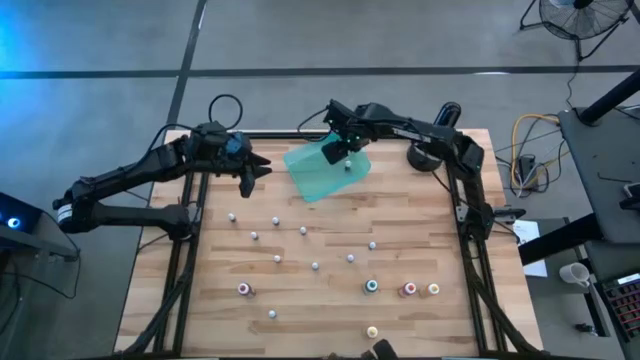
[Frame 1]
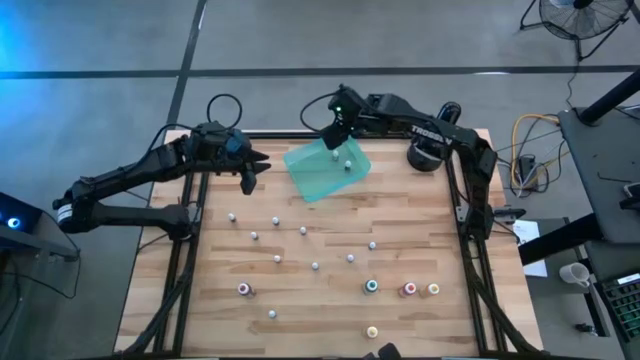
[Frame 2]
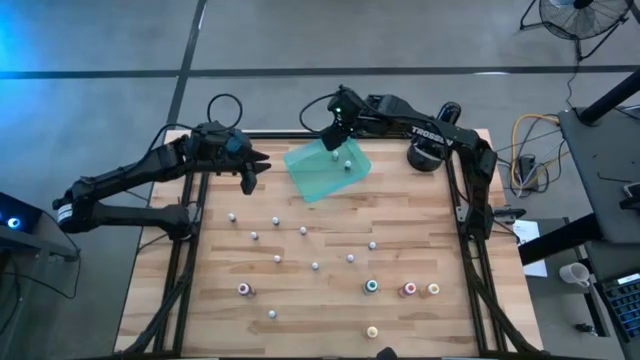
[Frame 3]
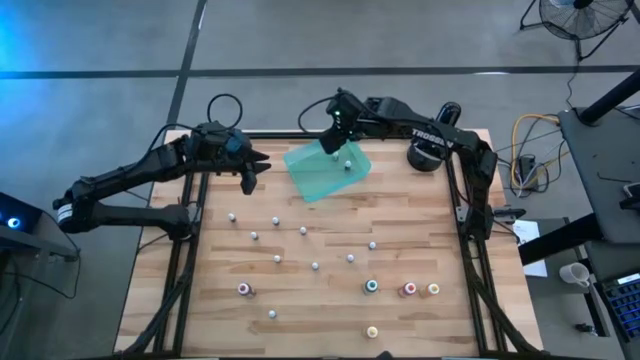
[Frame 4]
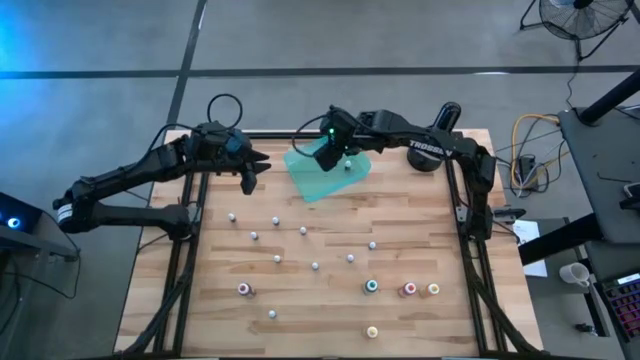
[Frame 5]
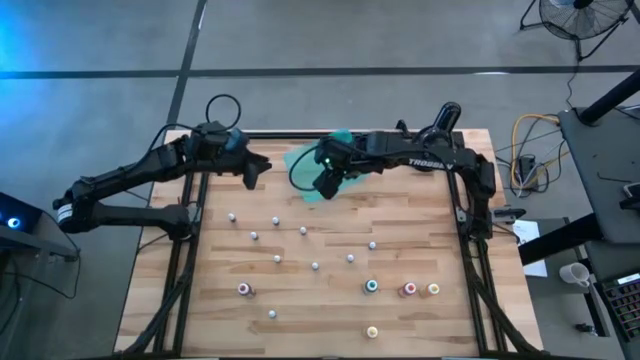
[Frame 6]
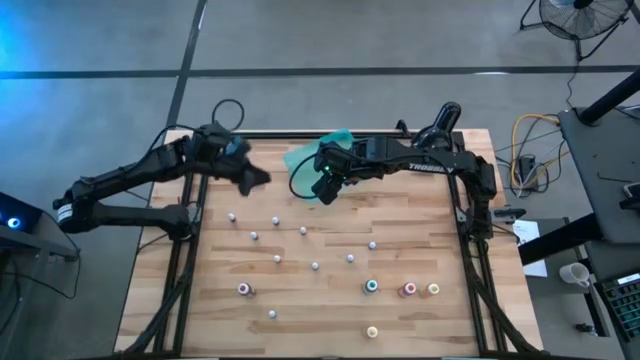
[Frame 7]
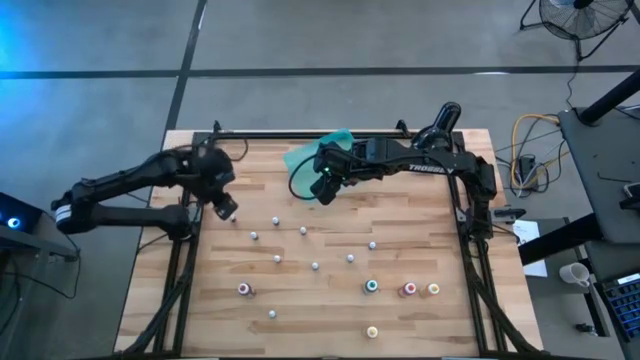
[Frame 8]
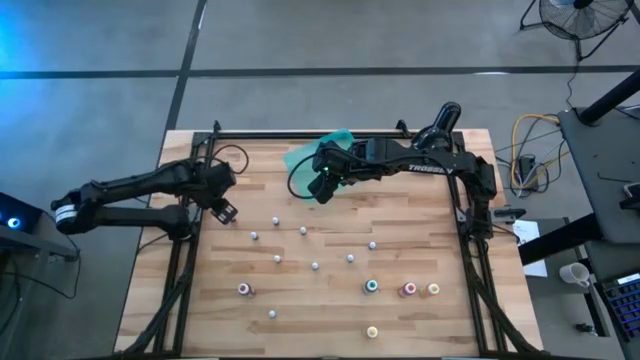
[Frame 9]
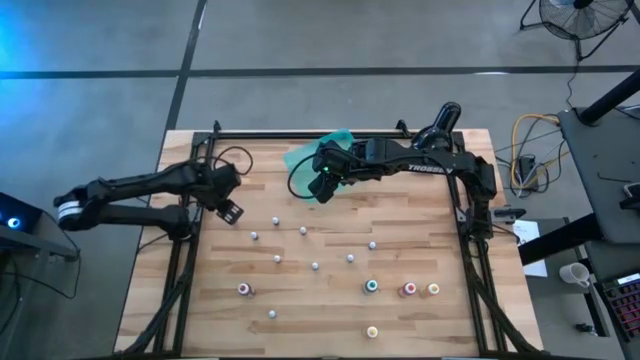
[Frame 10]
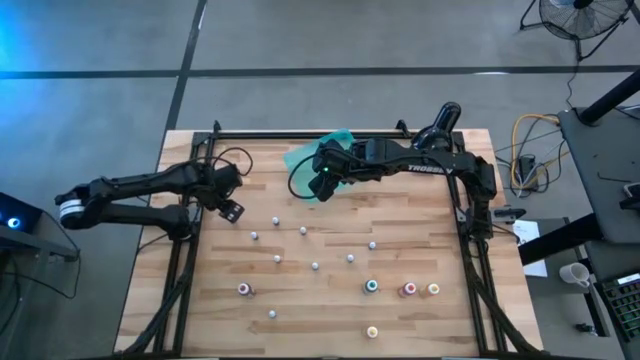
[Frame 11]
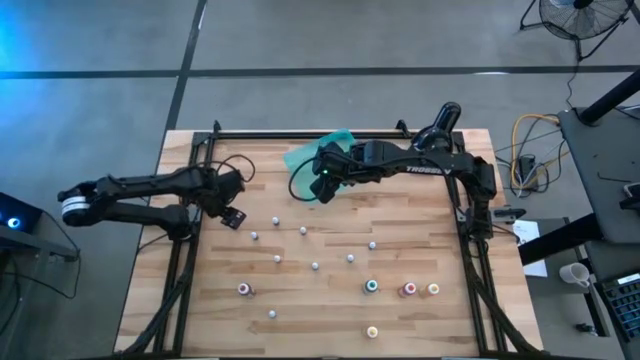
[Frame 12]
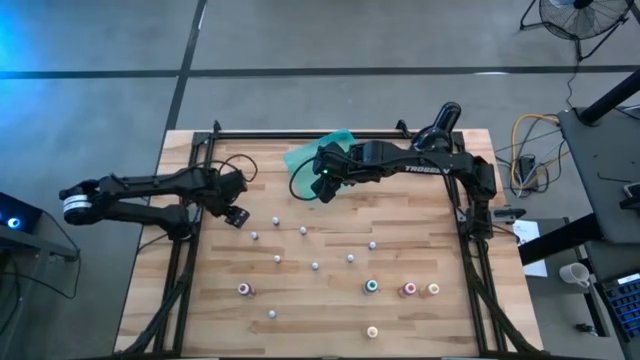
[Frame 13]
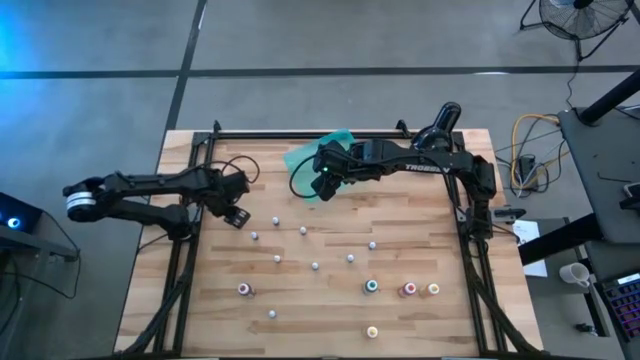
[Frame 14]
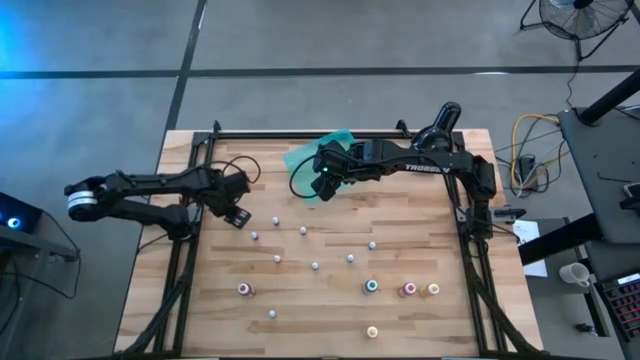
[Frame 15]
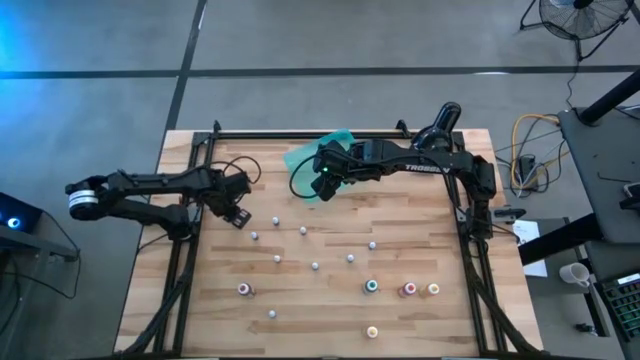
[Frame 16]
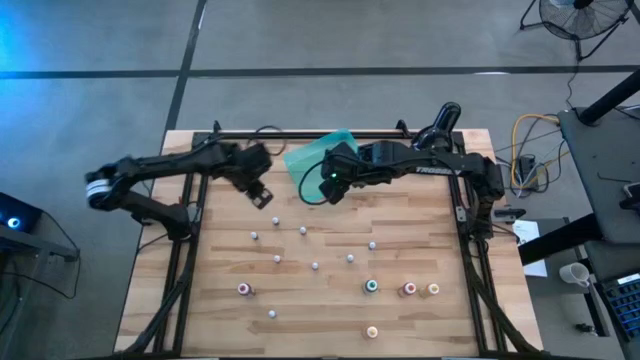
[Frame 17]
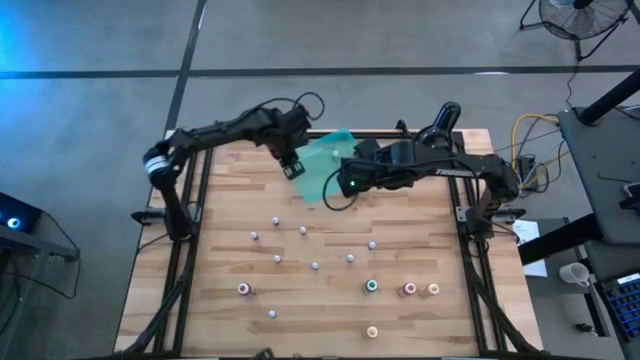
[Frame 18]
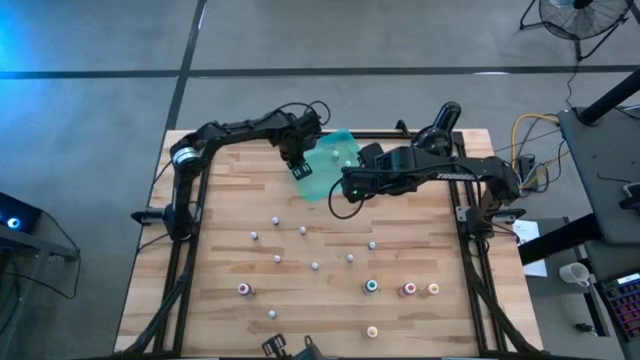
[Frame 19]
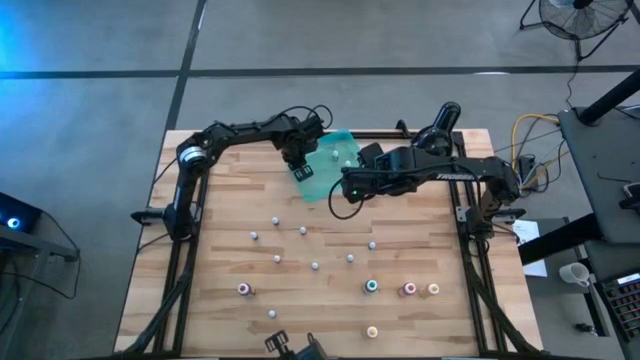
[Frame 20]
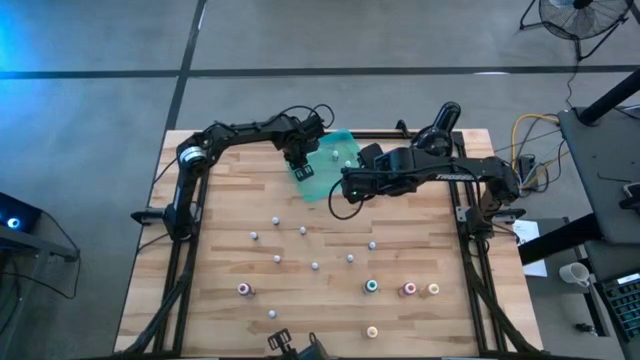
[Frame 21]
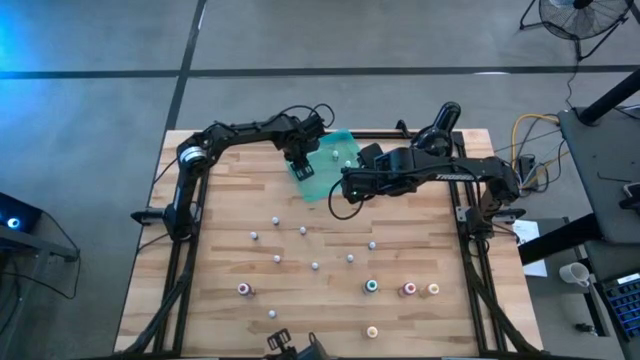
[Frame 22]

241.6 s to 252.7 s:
Task: Pick & Place food coloring
Put the green small food coloring into the green bin

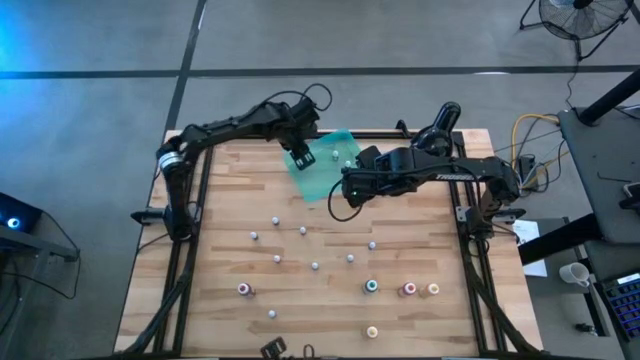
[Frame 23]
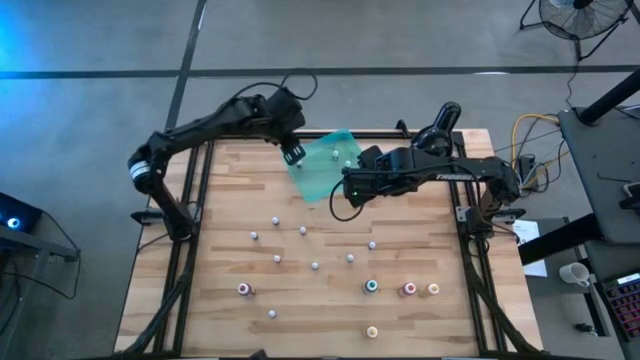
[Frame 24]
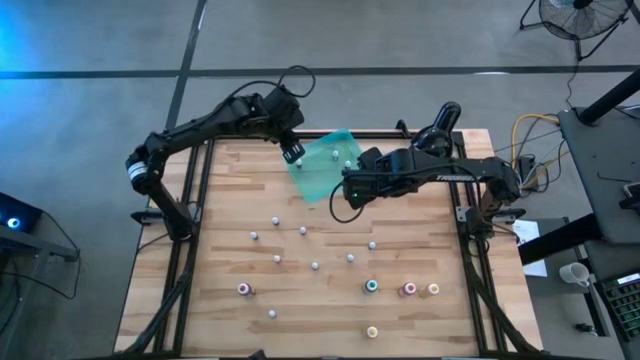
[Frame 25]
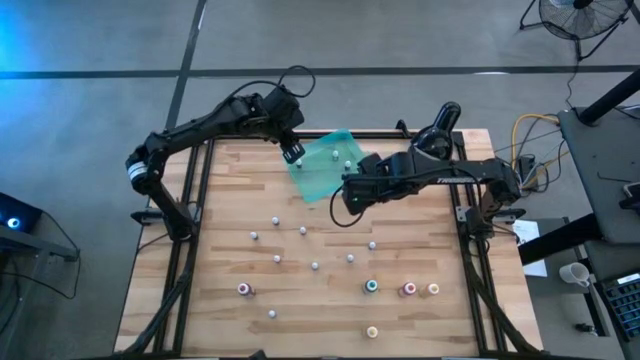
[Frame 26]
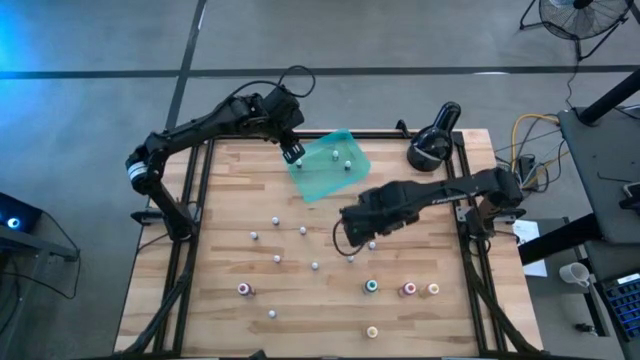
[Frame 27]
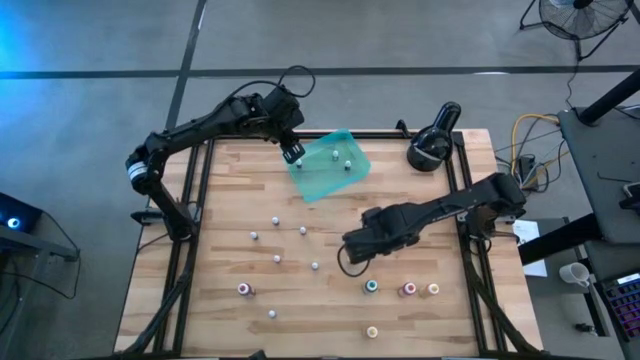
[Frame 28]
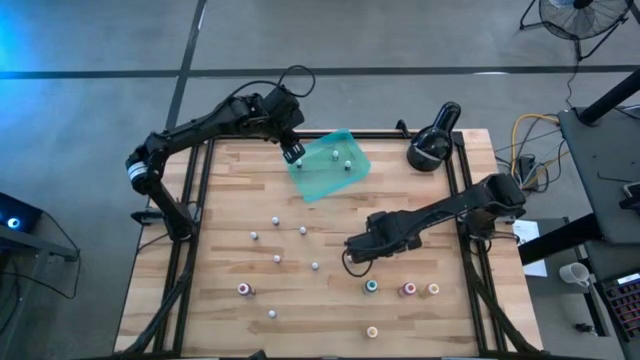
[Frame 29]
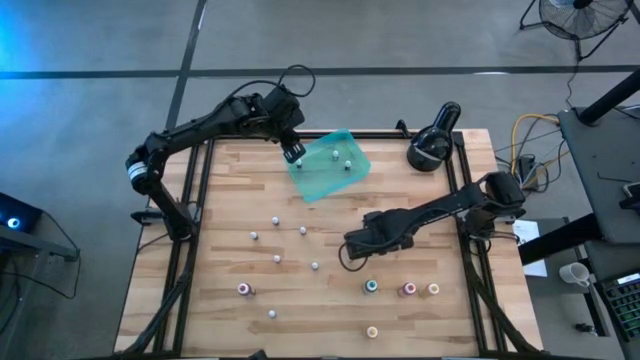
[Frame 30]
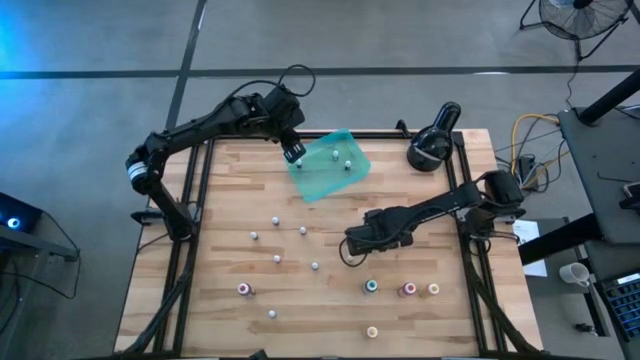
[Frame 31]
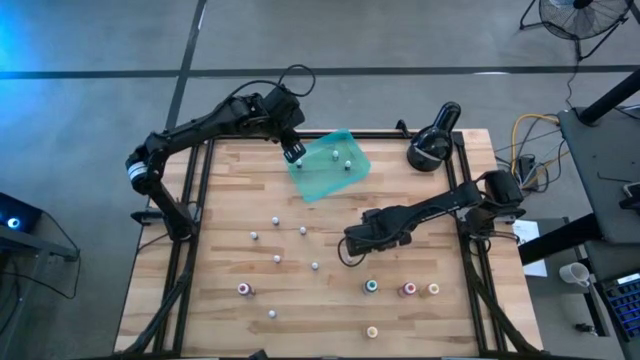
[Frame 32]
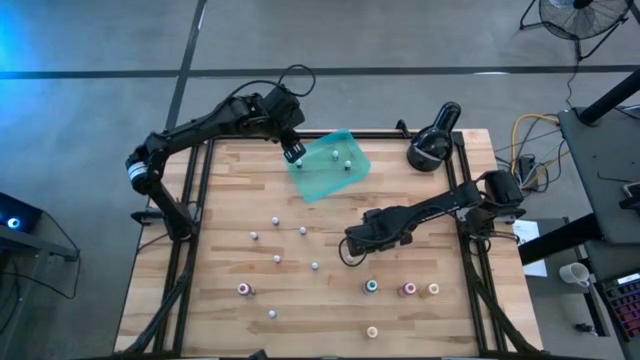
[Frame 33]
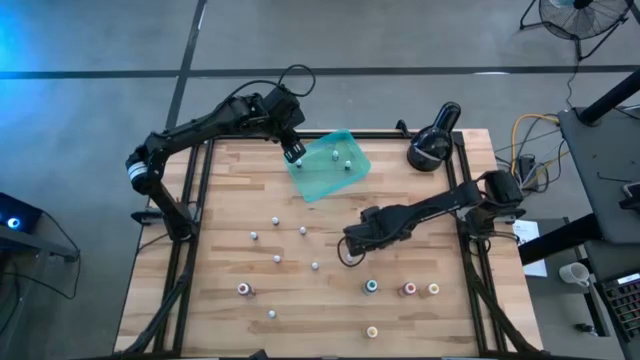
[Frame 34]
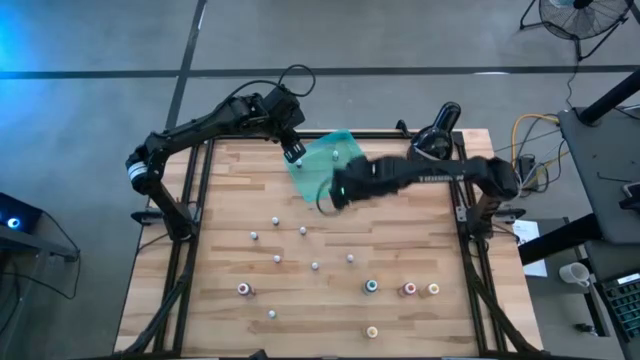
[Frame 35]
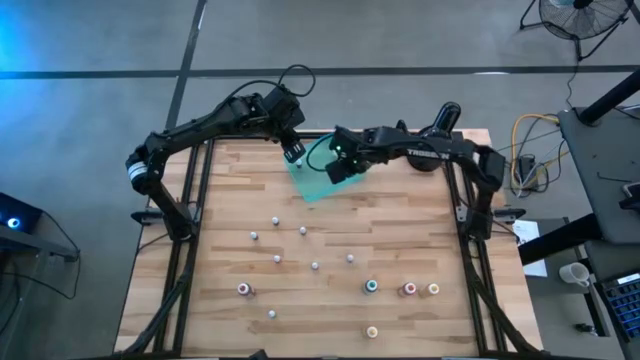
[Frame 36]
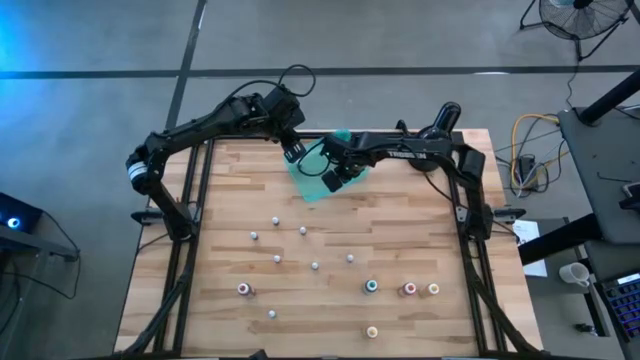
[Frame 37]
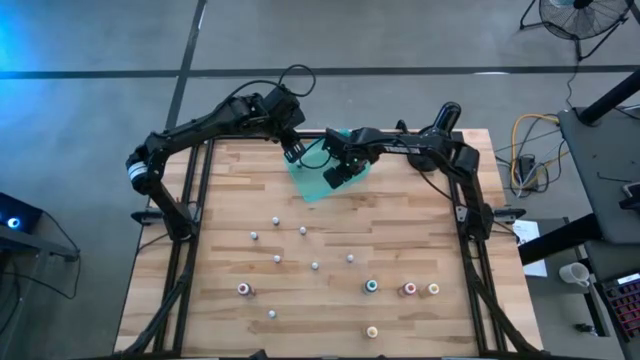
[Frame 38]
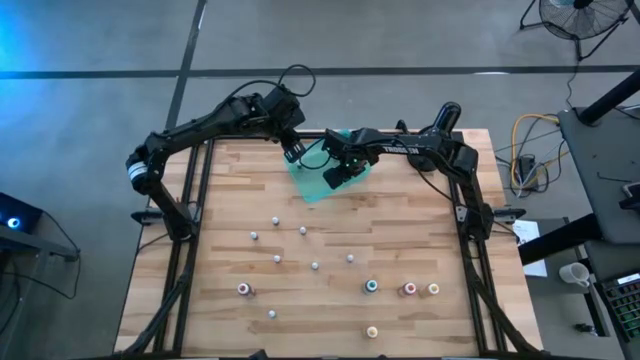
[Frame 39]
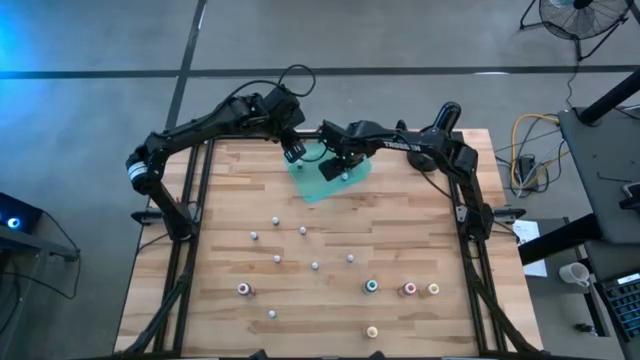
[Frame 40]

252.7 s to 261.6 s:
Put the red small food coloring into the green bin

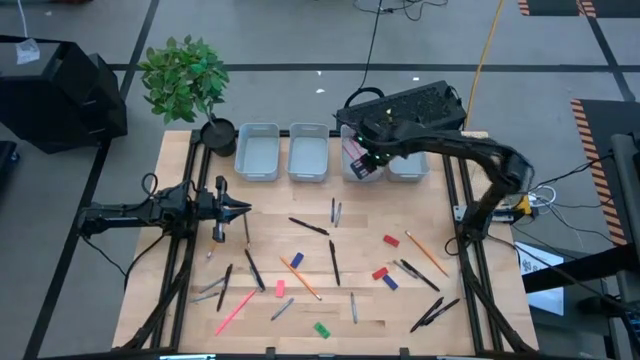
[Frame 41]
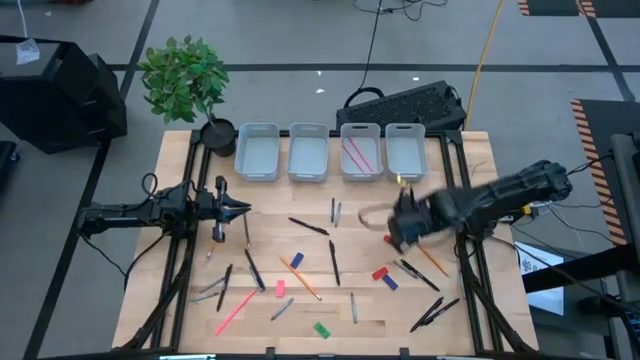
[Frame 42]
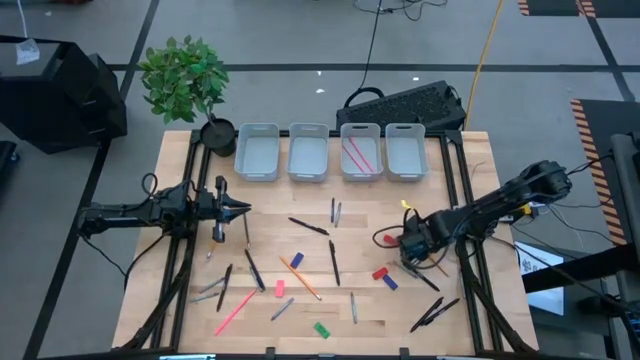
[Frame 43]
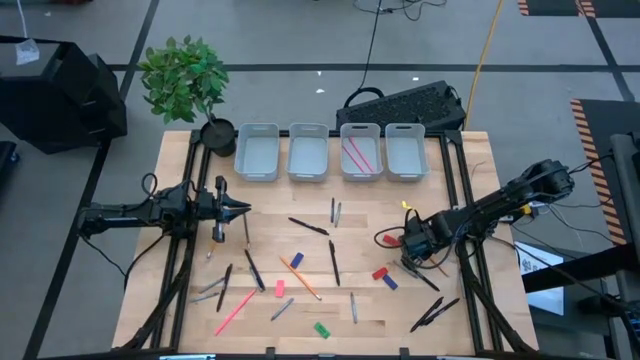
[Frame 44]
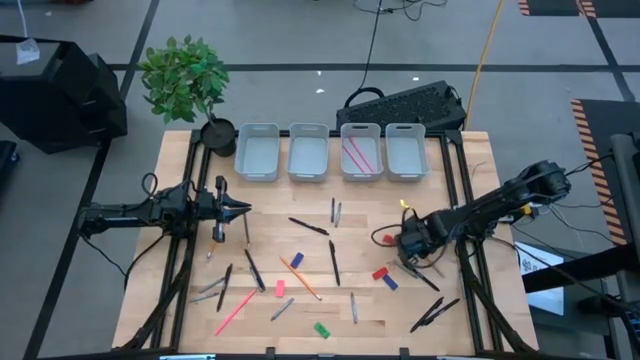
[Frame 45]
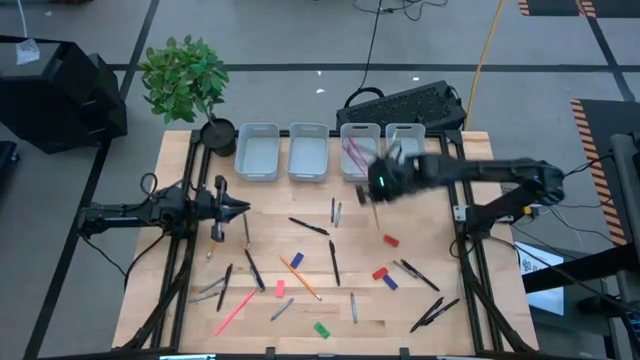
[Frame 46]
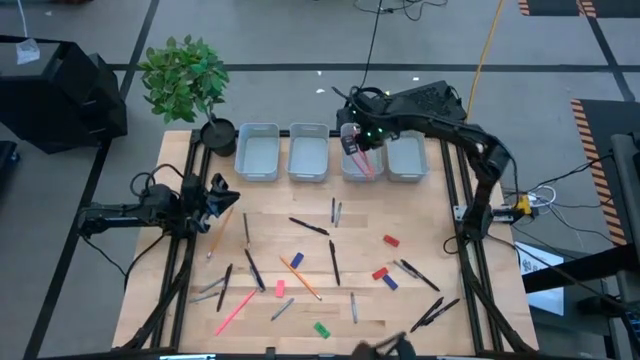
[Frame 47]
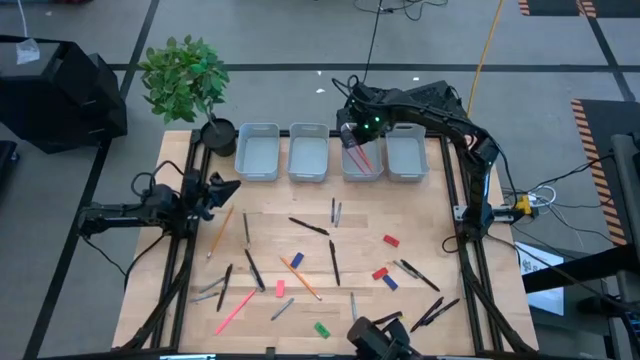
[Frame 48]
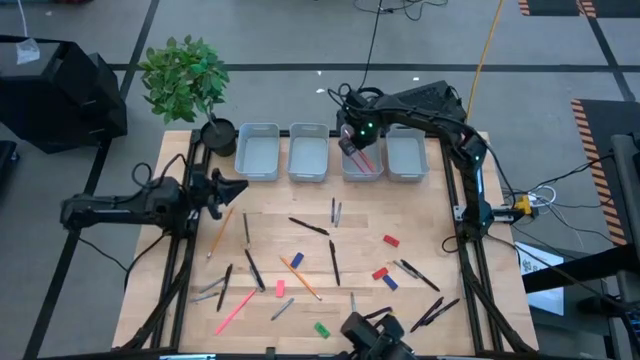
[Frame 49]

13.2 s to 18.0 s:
Task: Sort crayons/erasers/pens/pencils in bins
Put the orange pencil into the middle right gray bin
